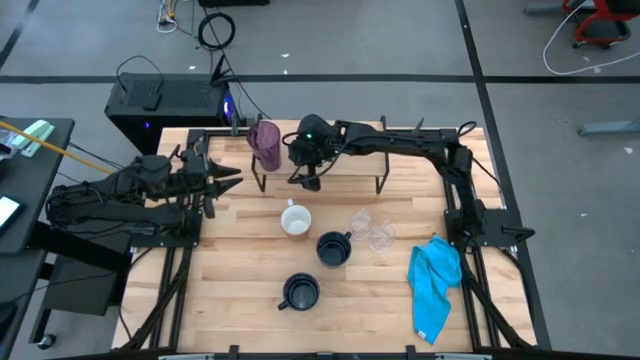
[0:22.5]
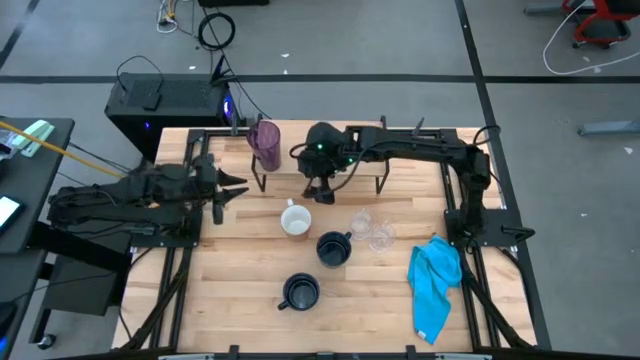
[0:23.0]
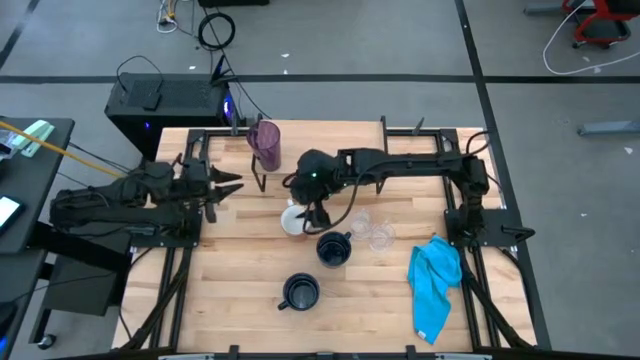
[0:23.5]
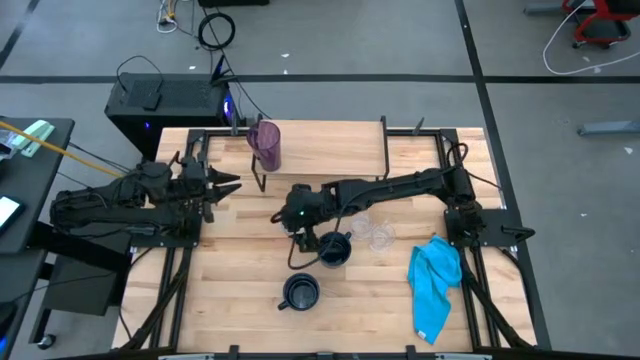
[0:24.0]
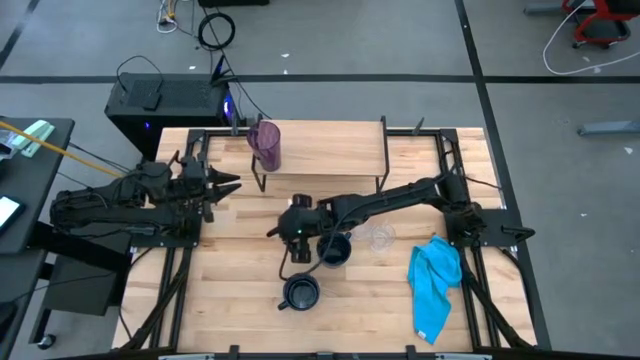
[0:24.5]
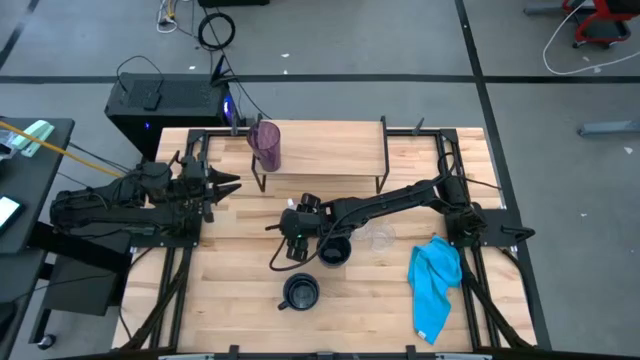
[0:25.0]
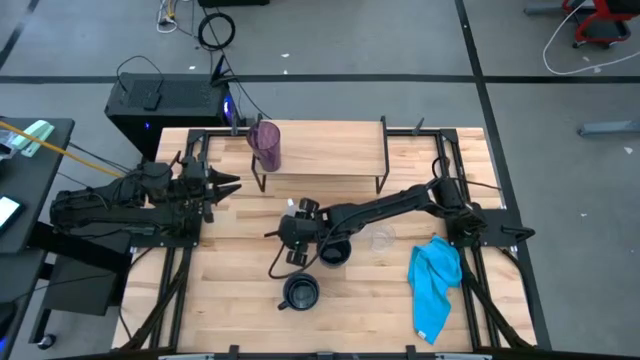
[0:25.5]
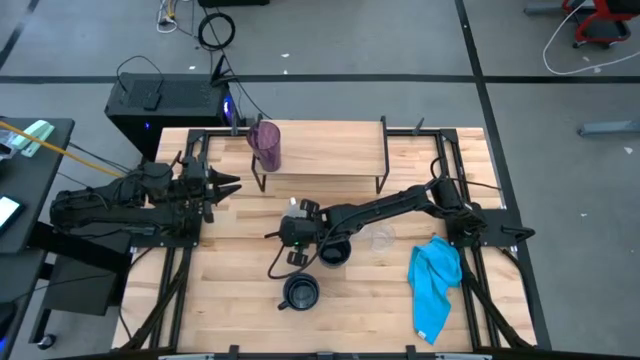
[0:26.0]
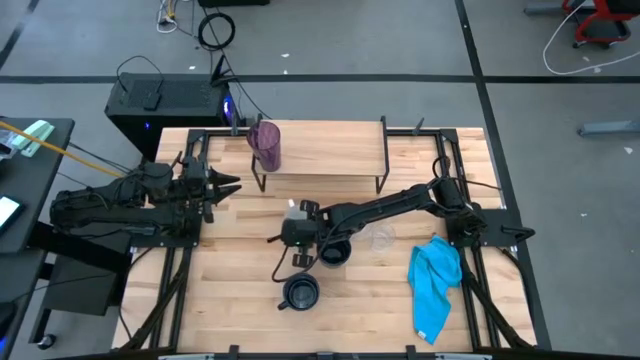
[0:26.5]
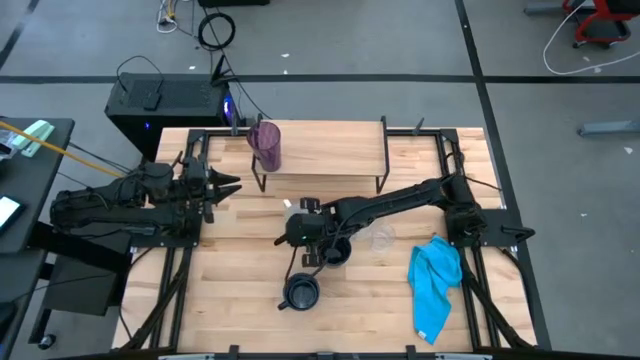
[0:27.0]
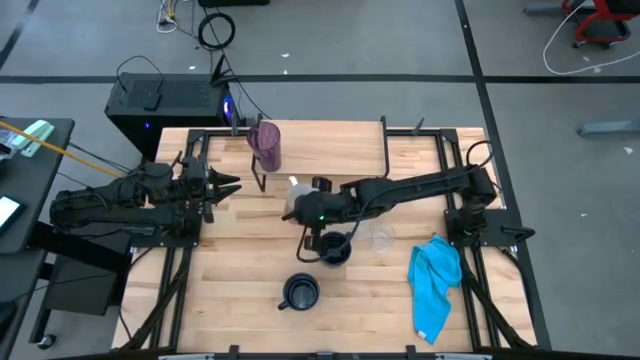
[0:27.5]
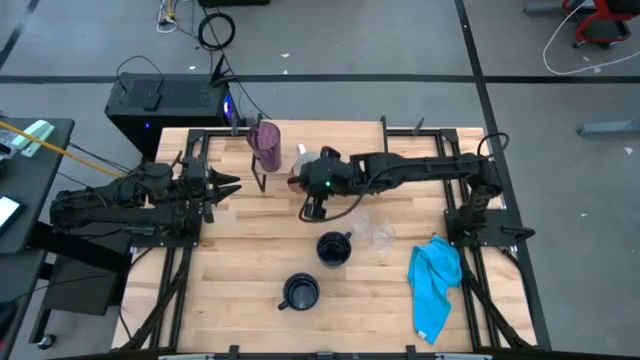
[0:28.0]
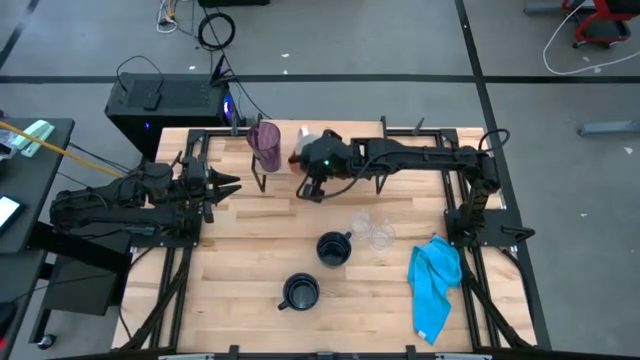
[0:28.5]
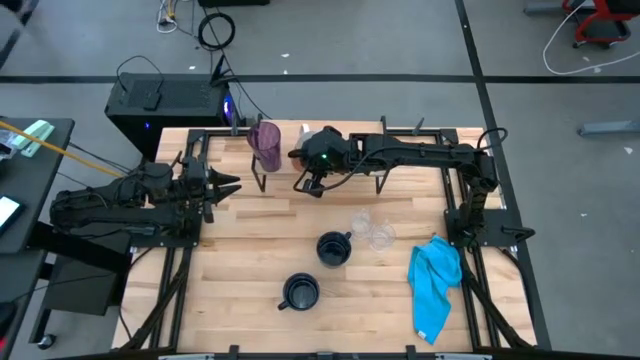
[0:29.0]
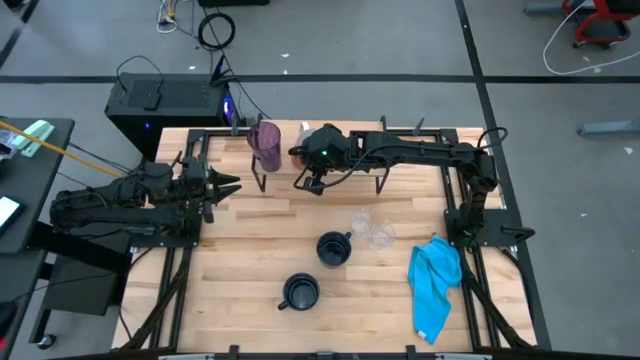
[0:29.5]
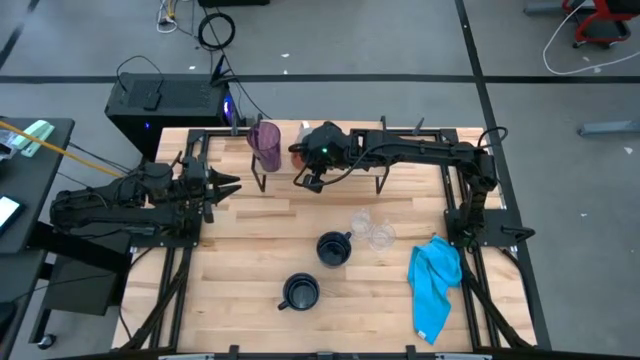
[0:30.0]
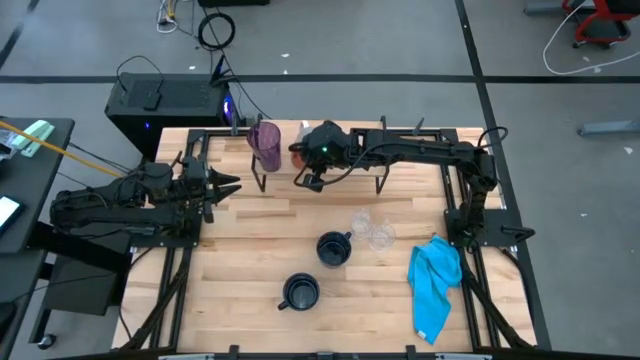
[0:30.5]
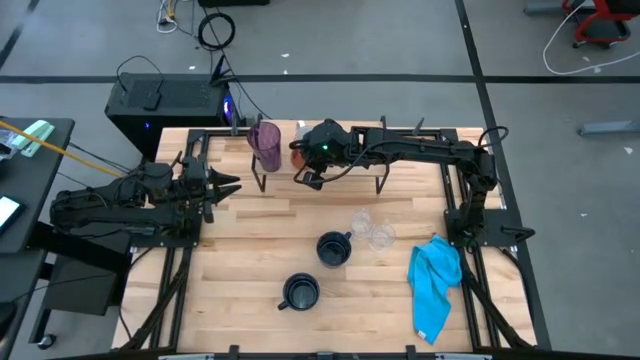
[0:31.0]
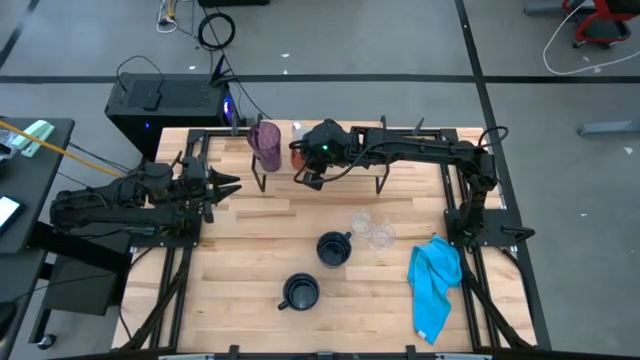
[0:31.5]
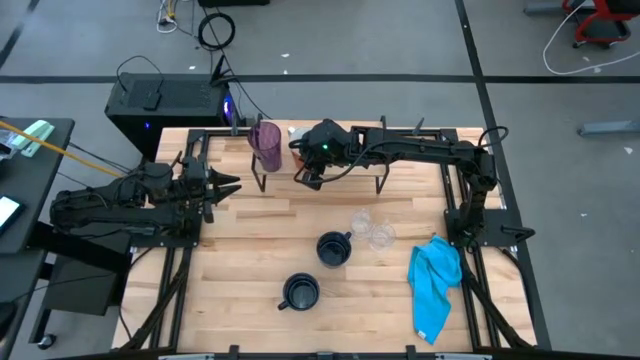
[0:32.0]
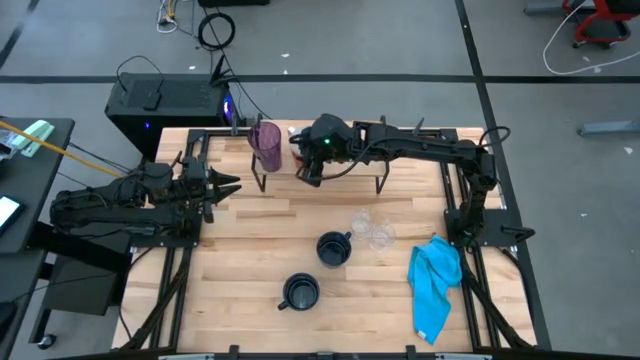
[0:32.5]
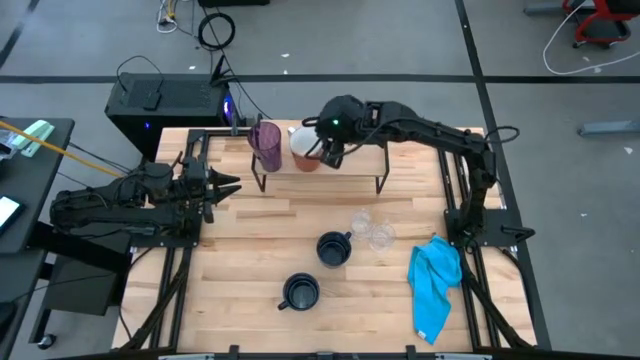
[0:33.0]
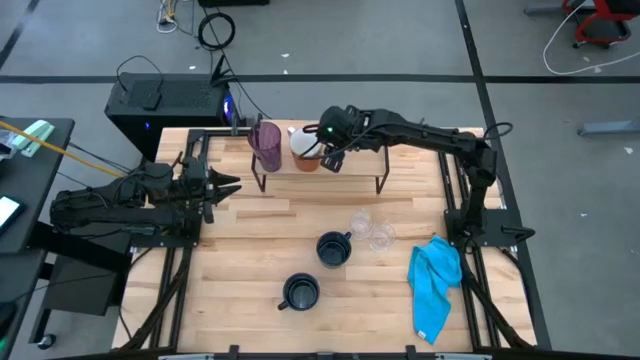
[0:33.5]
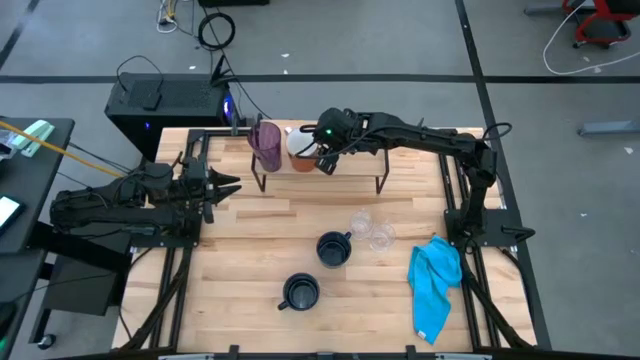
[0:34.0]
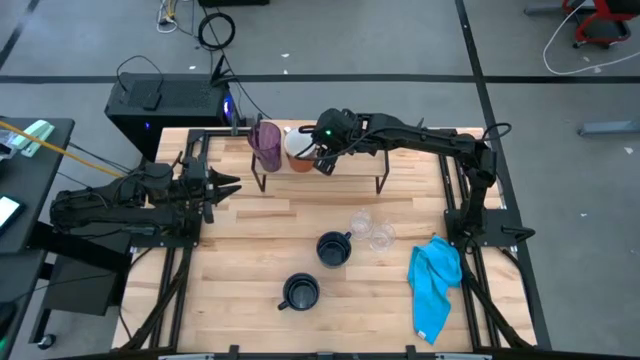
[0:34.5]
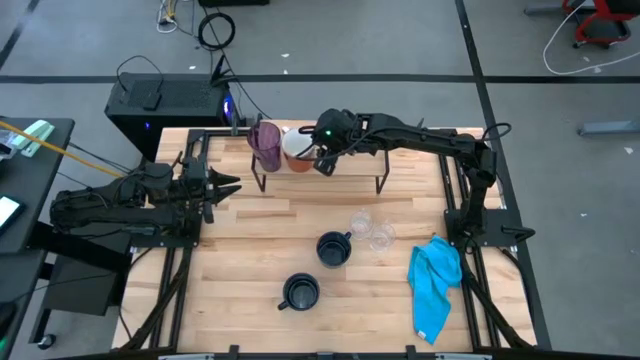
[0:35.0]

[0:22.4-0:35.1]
Task: Stack small to large cups/mugs on shelf
Put the orange mug on the shelf

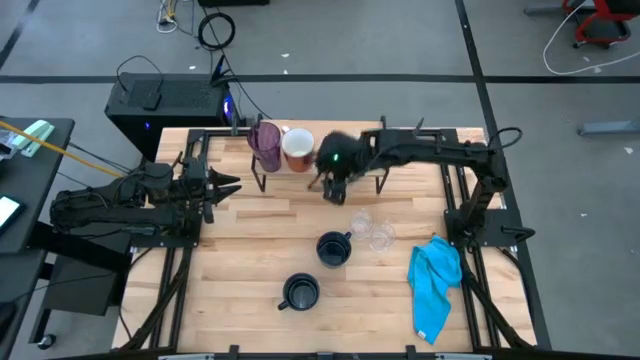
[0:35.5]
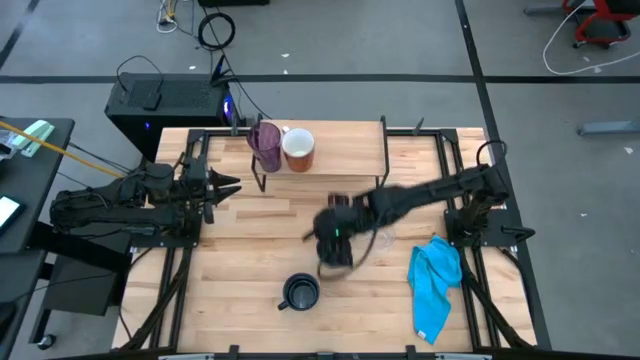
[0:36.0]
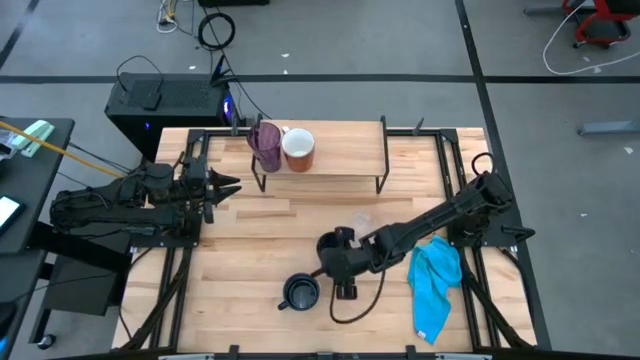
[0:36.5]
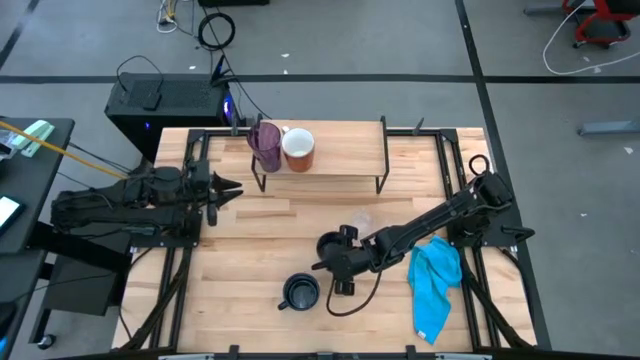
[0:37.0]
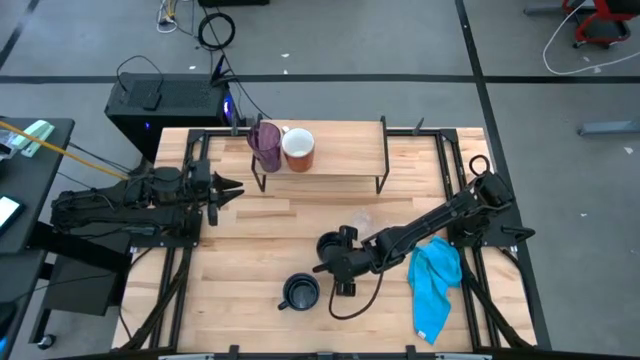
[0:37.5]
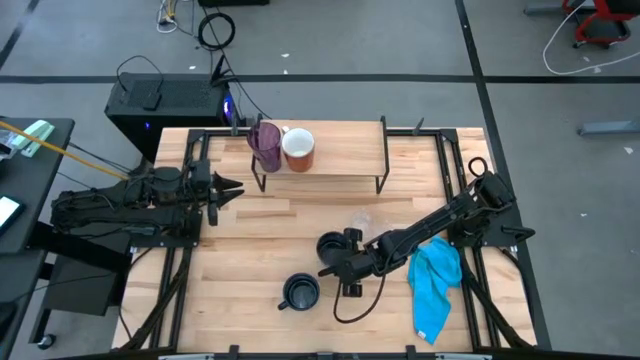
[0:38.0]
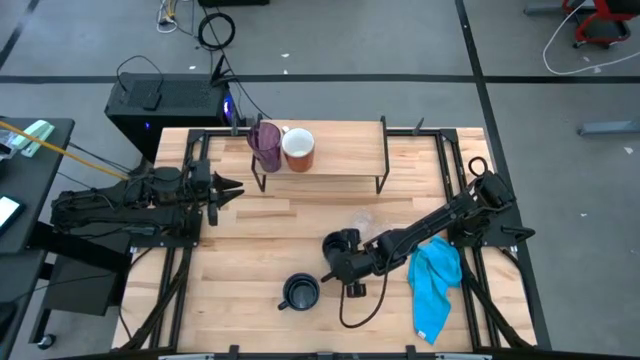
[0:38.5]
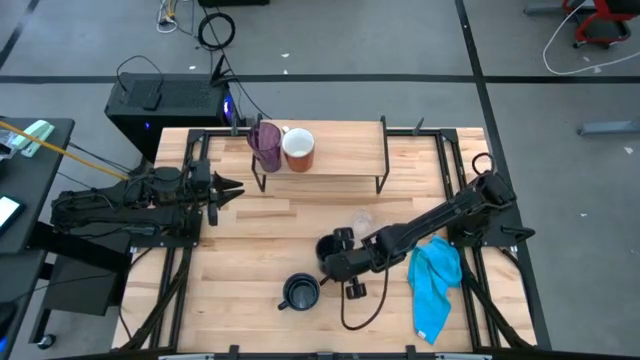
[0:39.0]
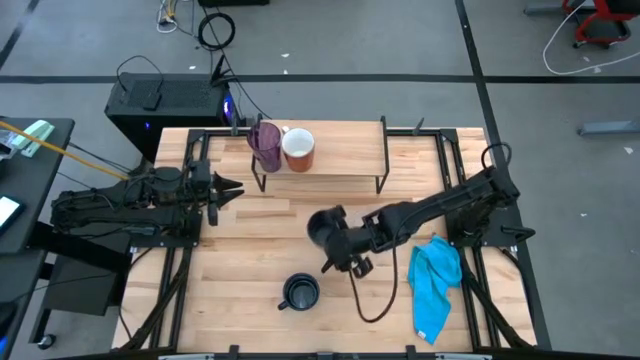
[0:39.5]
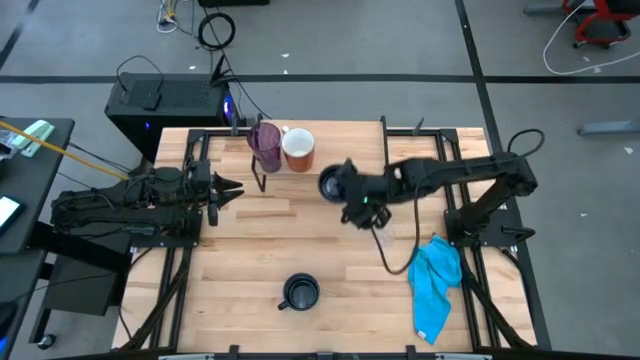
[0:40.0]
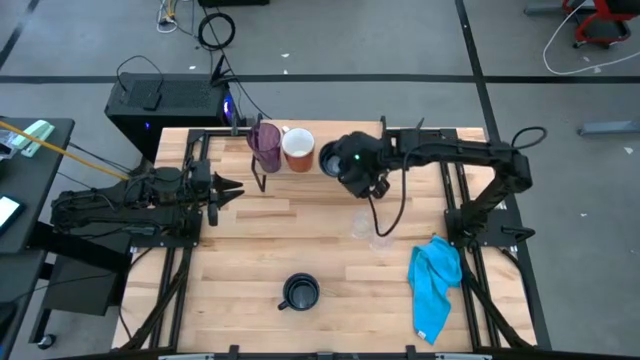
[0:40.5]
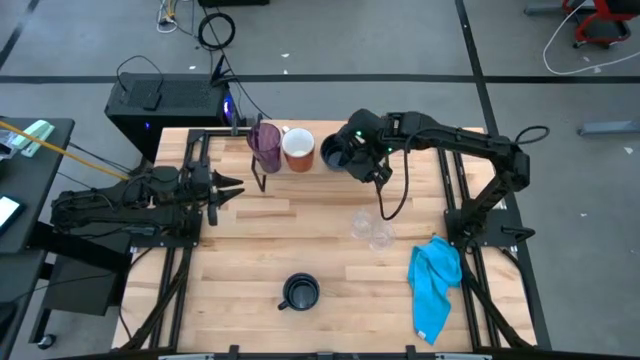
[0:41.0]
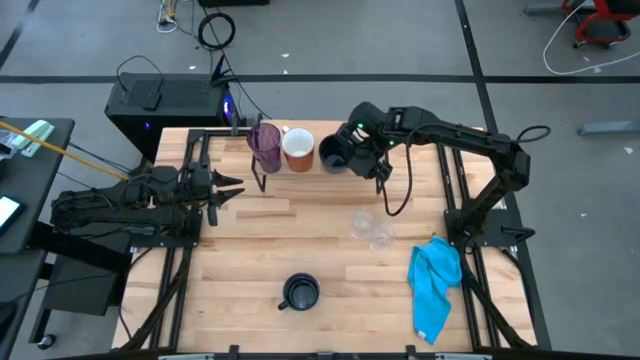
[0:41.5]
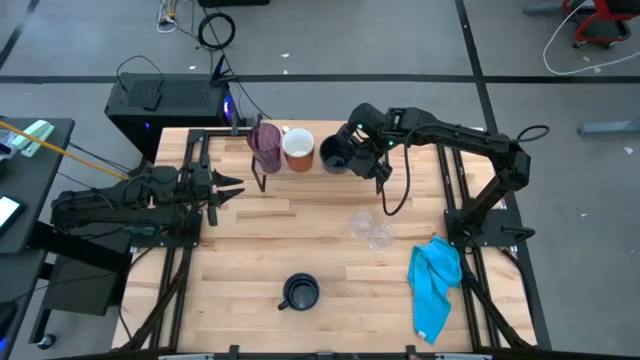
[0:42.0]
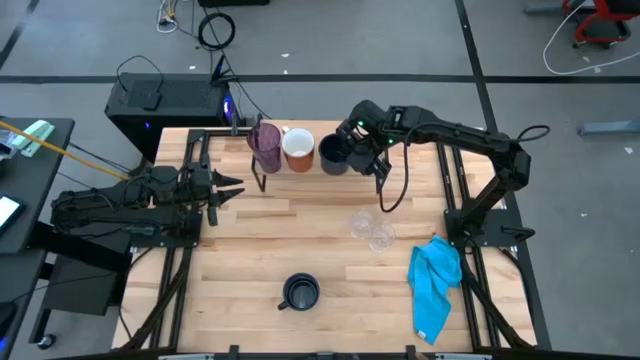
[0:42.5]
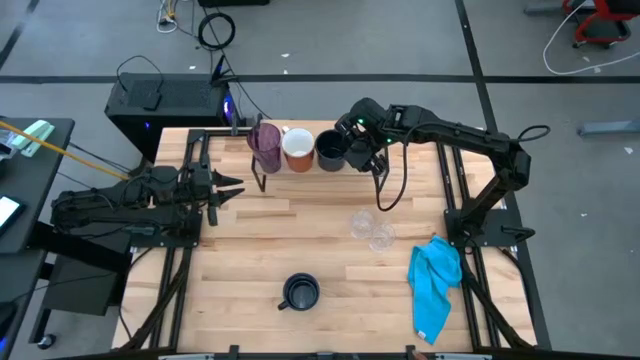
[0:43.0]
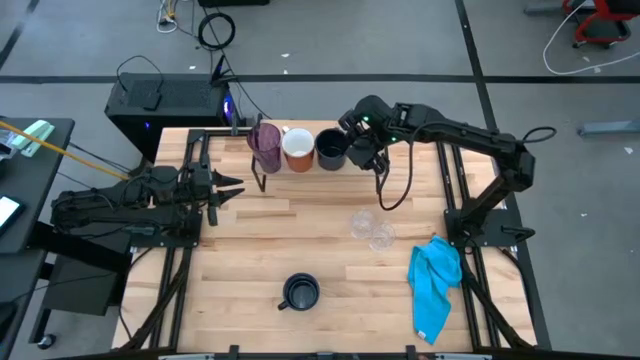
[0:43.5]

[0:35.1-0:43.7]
Put the blue mug on the shelf
